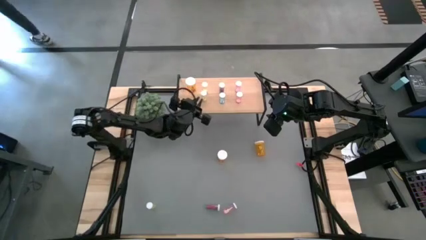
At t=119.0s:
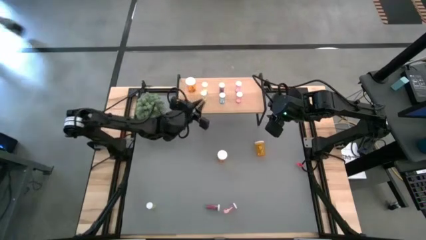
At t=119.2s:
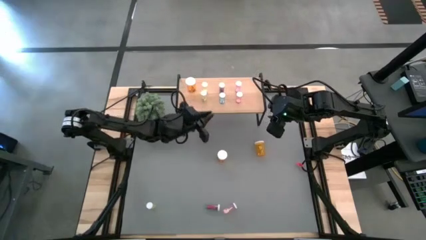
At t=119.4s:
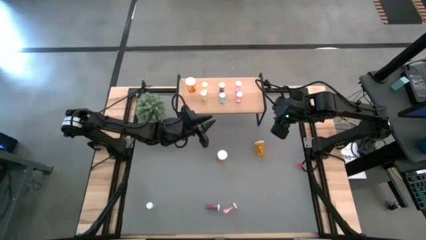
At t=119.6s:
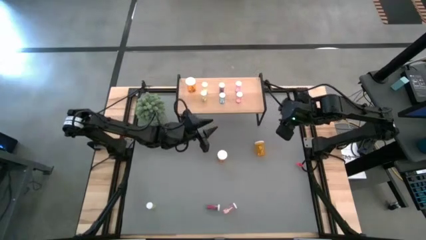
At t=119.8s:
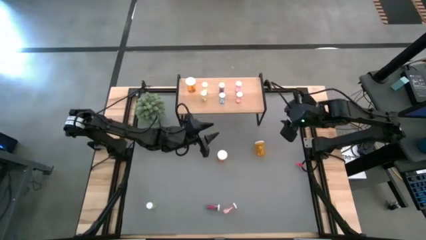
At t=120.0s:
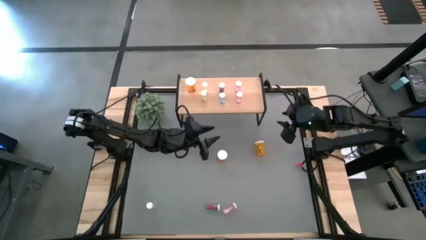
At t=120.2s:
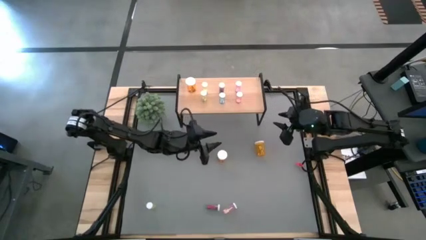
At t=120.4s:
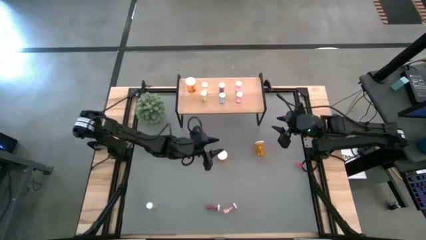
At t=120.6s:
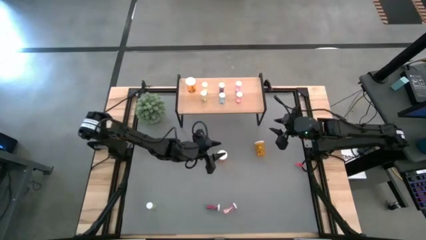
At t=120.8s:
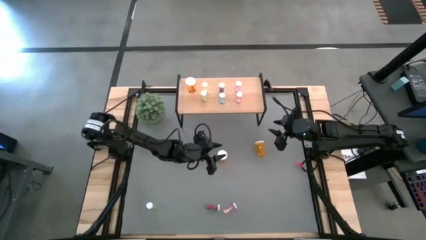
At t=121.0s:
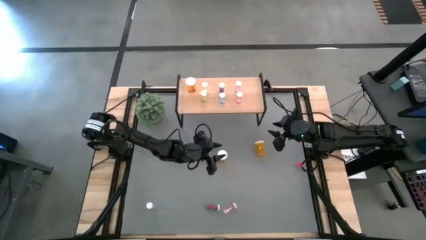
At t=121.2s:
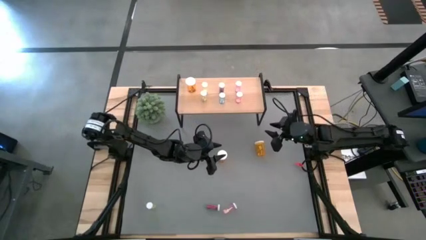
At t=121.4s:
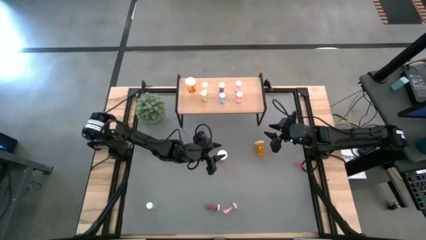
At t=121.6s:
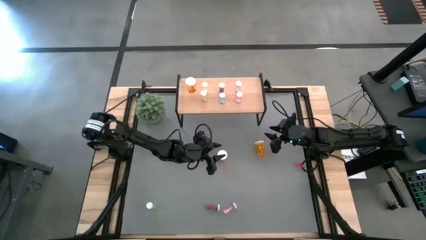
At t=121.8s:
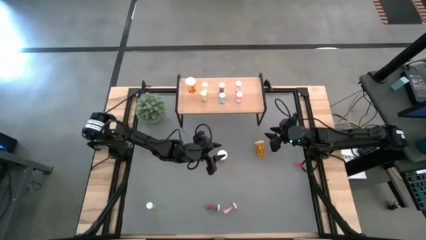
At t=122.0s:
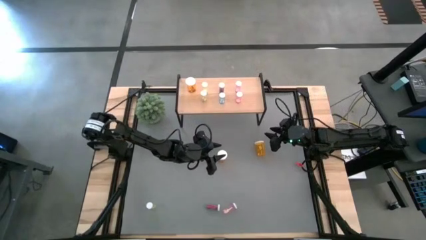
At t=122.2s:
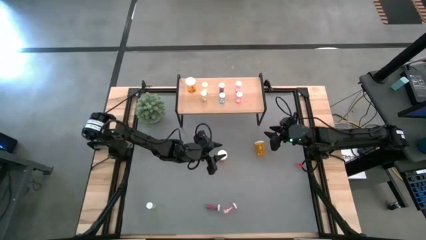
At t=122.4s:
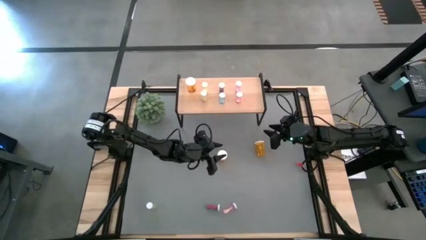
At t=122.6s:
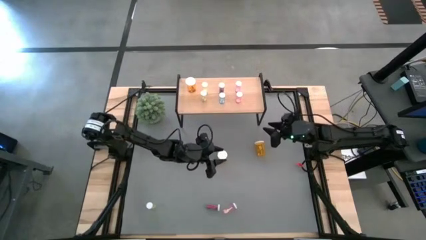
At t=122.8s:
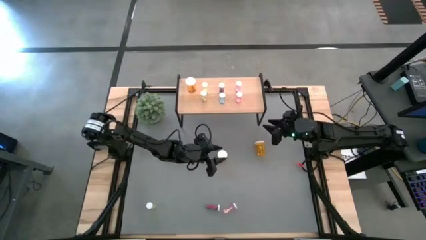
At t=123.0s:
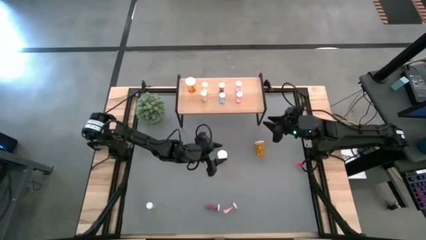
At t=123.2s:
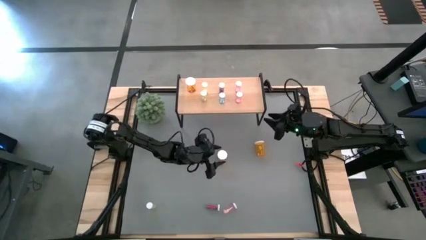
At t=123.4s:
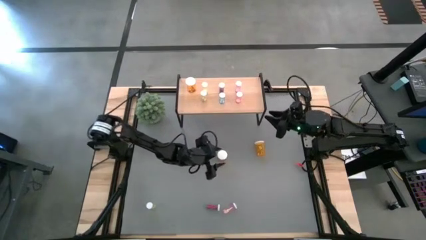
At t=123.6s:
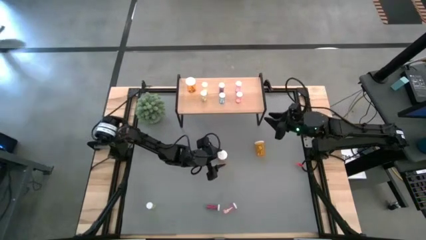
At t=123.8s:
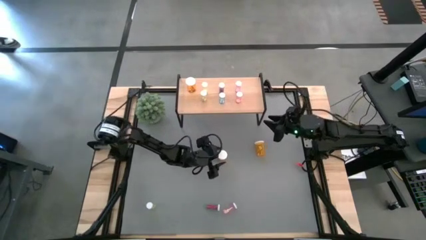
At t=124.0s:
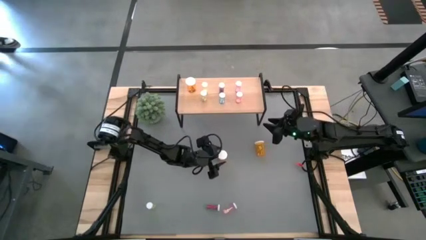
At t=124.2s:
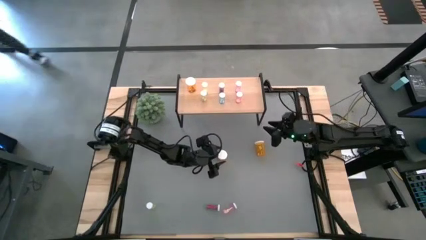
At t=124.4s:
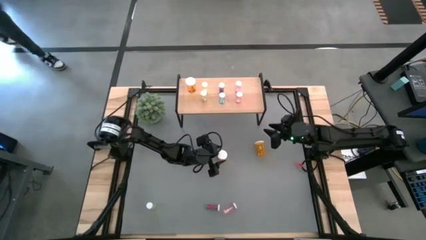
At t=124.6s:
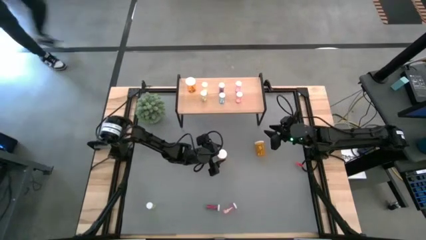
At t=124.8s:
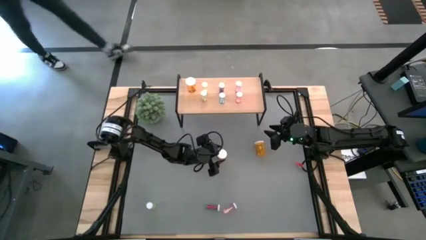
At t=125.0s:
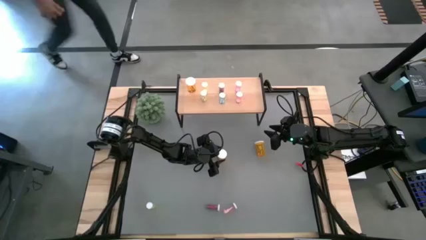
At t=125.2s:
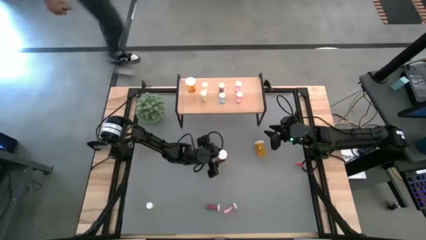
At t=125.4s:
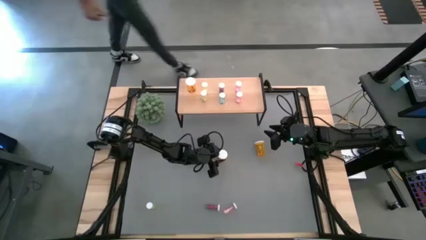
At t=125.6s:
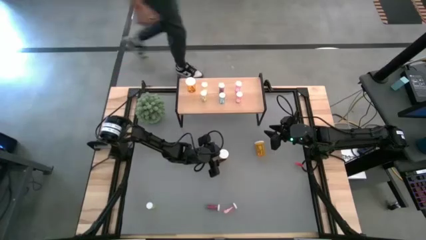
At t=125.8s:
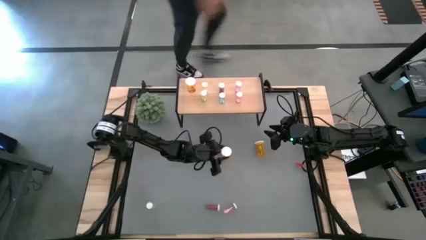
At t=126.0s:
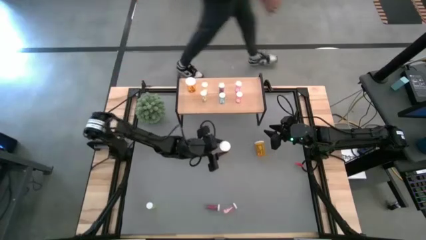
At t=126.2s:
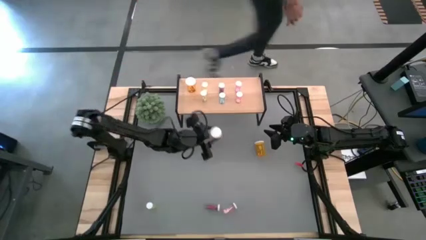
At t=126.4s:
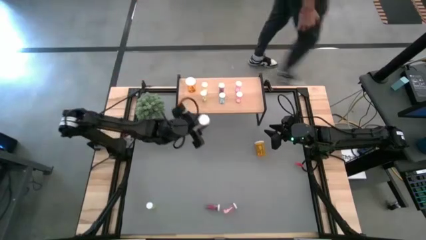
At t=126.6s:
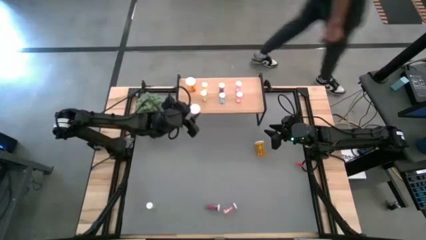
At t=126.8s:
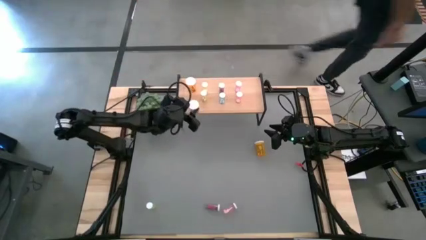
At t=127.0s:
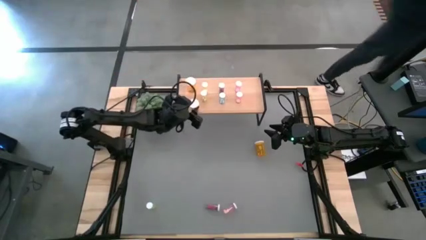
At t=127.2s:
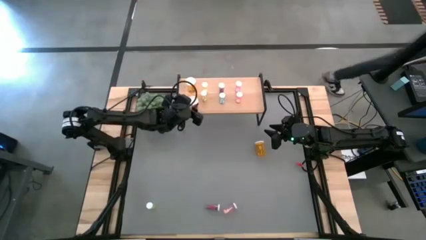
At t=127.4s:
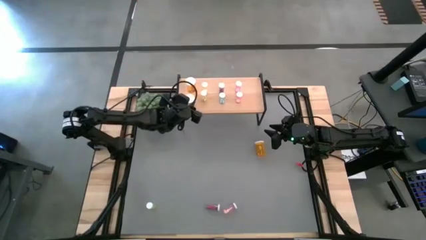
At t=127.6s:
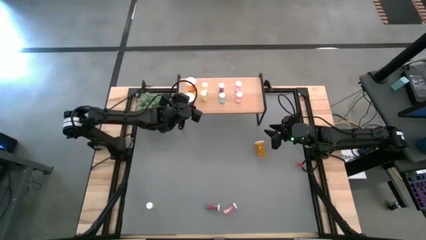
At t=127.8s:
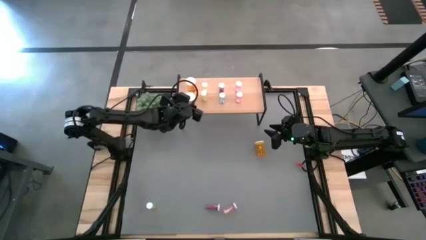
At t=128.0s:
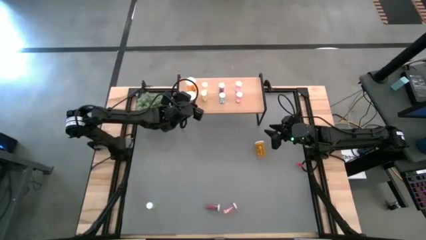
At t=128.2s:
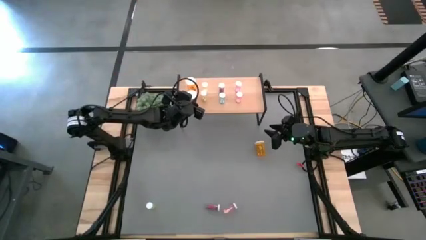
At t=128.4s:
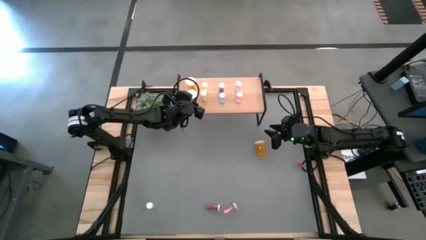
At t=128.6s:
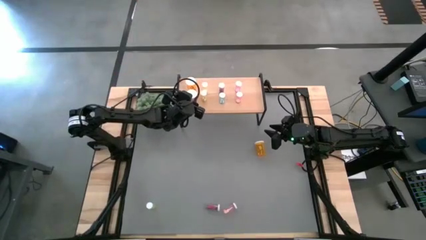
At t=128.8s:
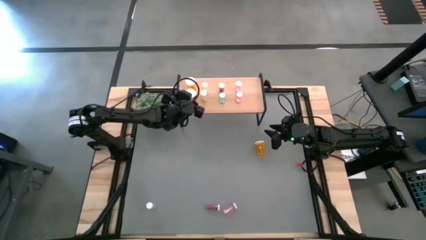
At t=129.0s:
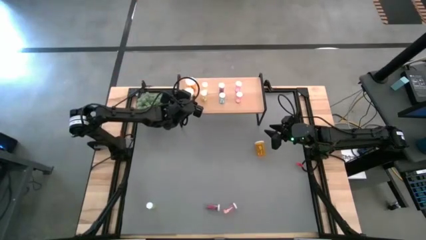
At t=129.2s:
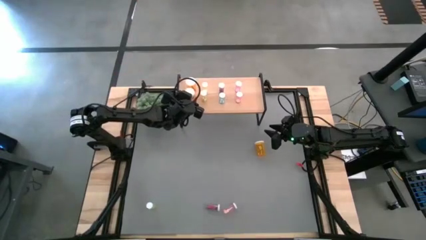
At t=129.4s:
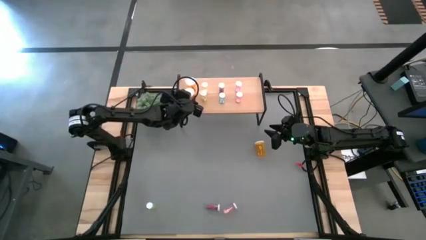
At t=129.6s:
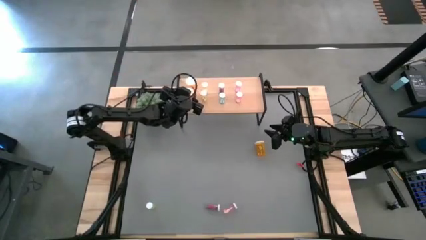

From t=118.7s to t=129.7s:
Task: Pick and place medicine bottles onto shelf by color
Put the left orange pill bottle on the shelf aligned with the other orange pill bottle
